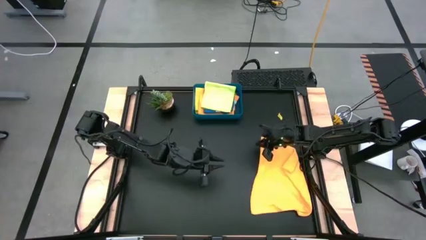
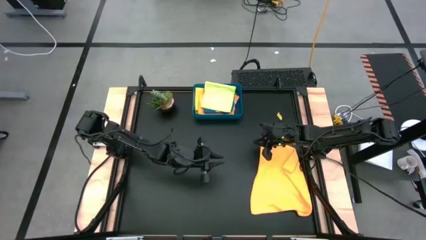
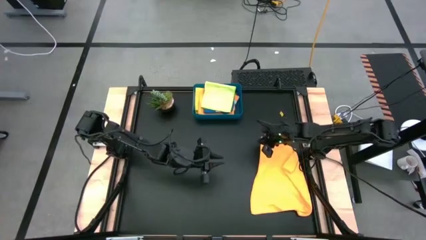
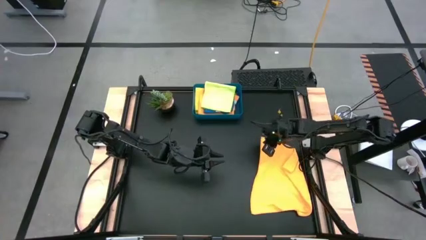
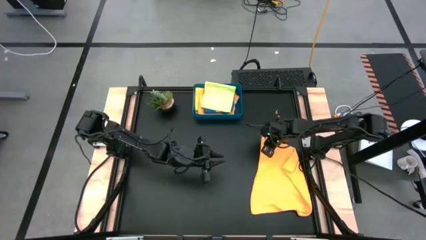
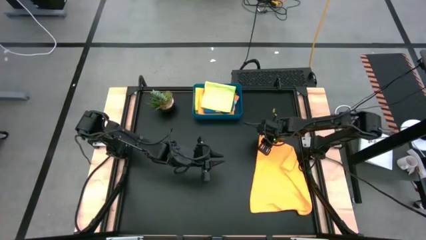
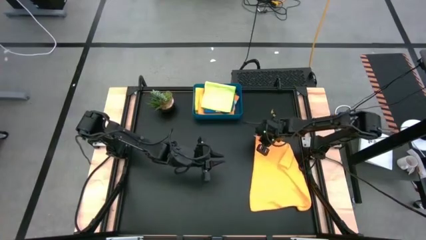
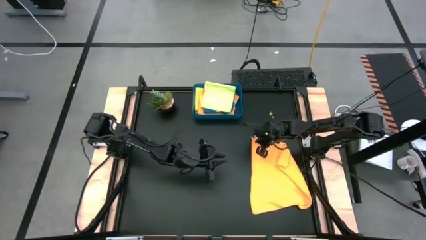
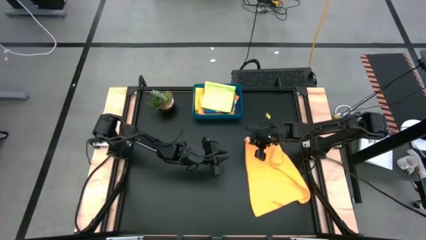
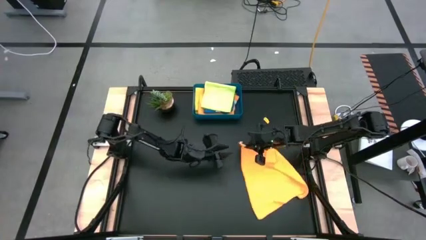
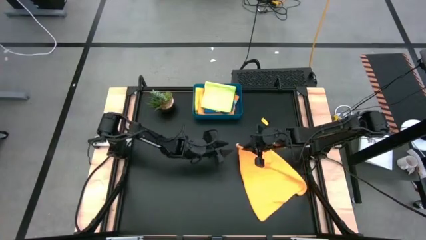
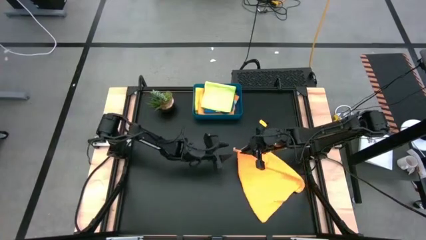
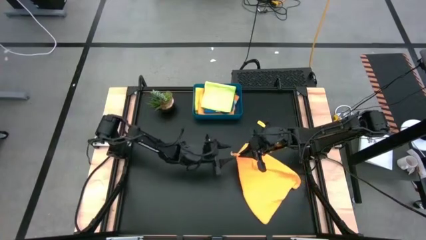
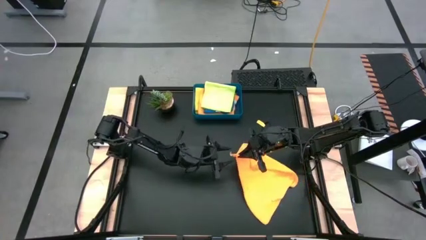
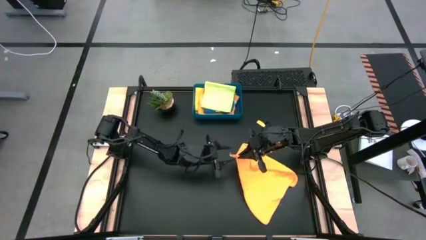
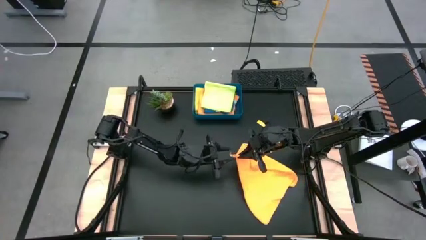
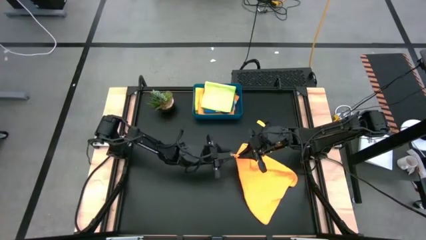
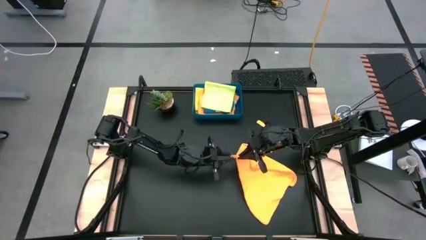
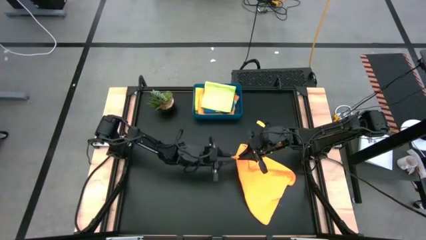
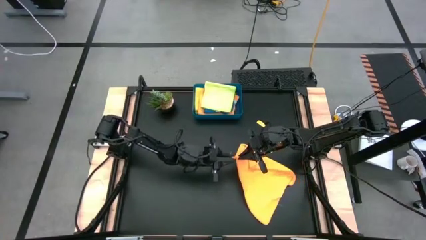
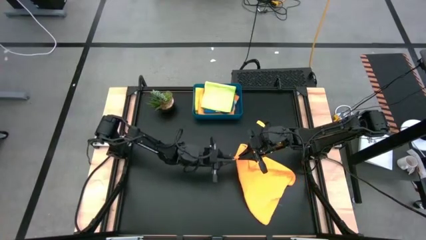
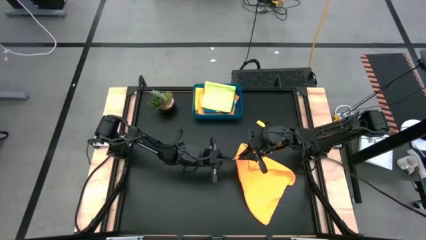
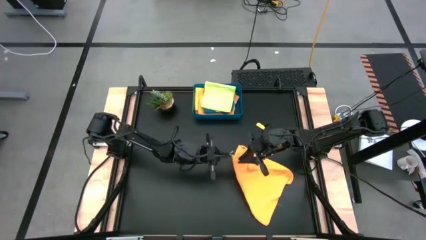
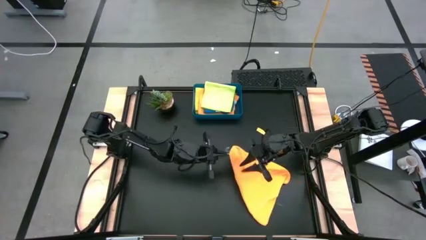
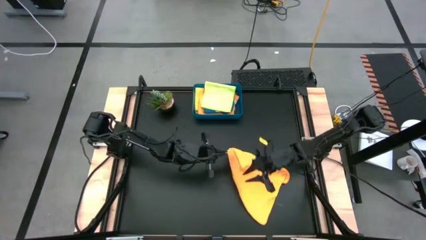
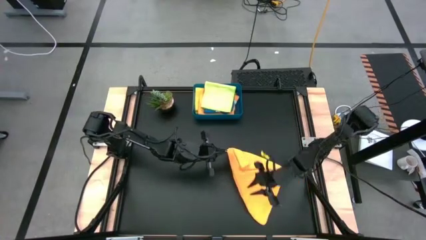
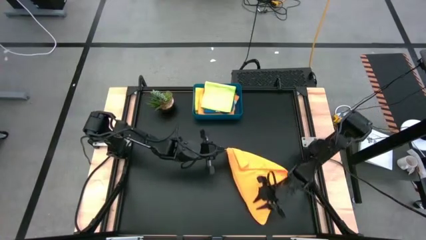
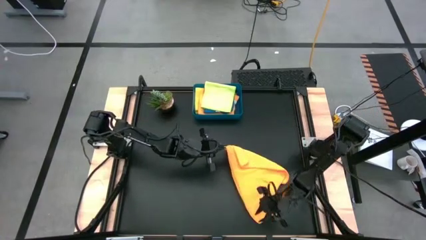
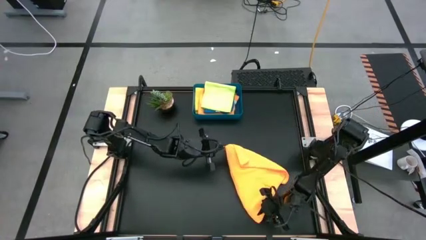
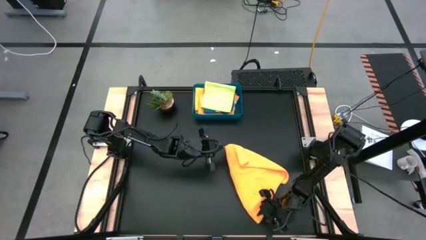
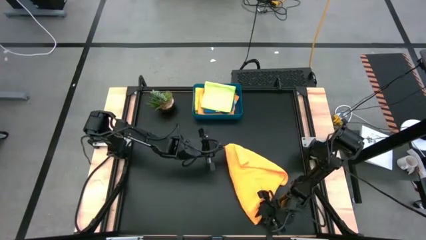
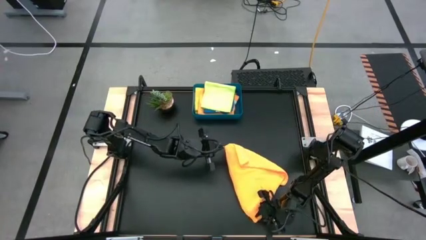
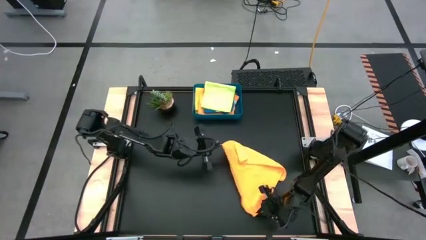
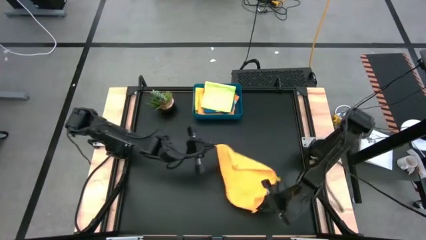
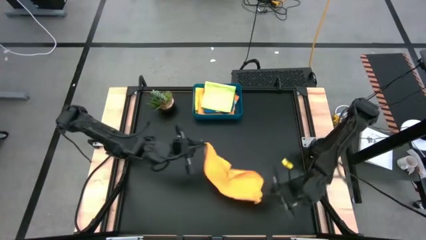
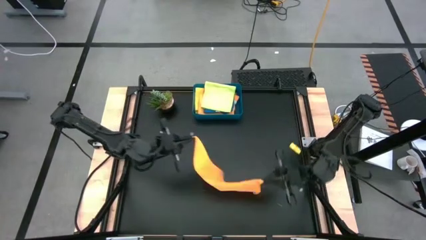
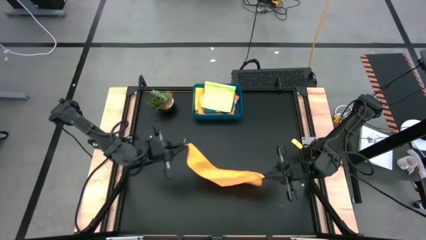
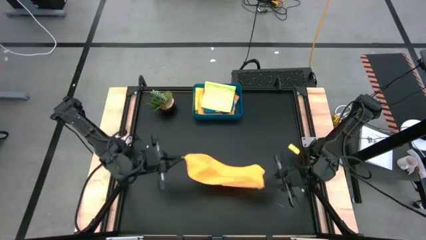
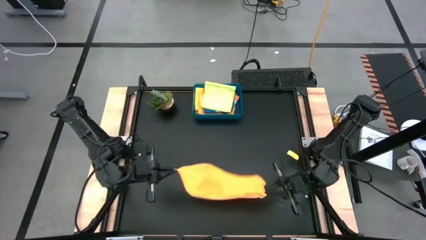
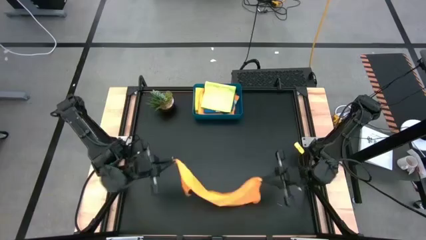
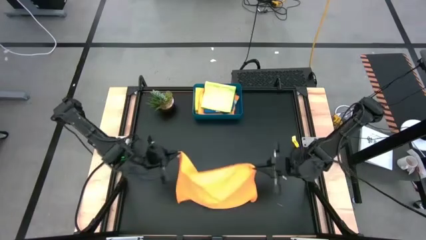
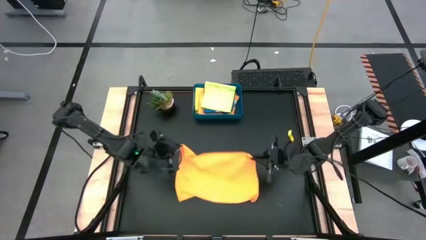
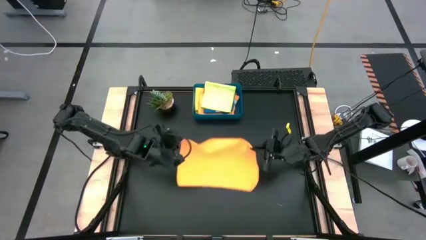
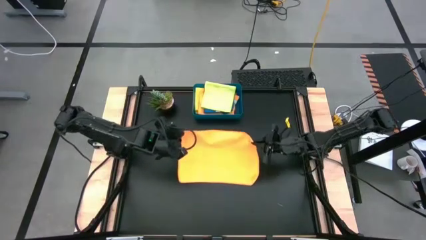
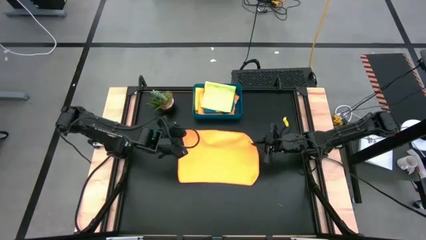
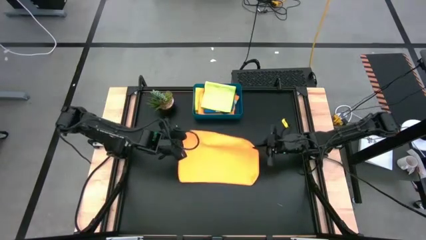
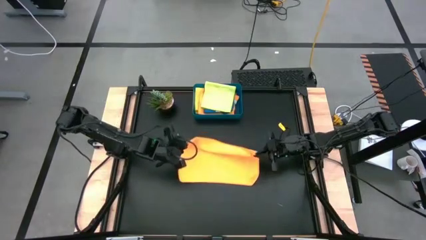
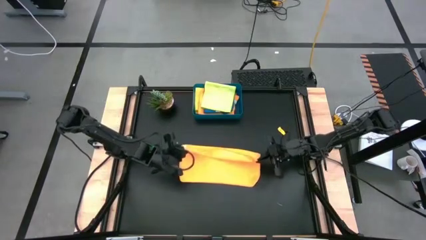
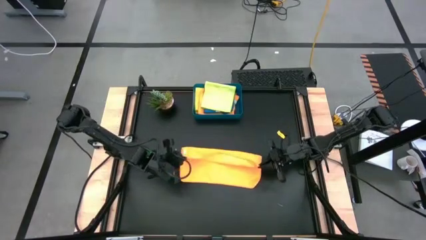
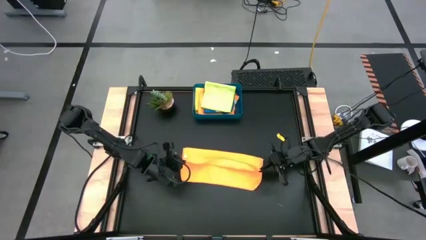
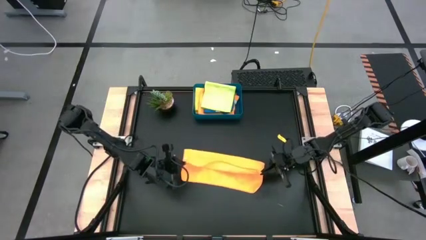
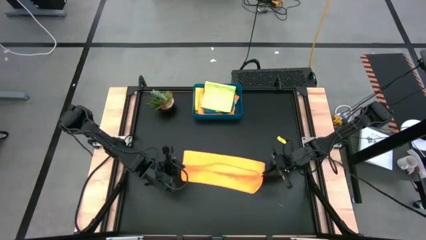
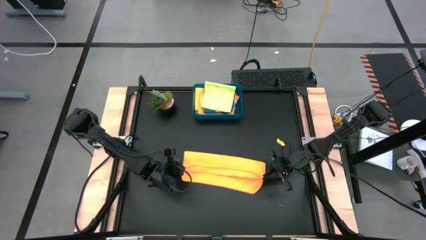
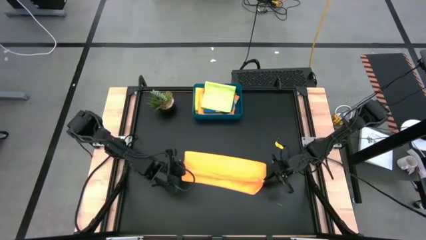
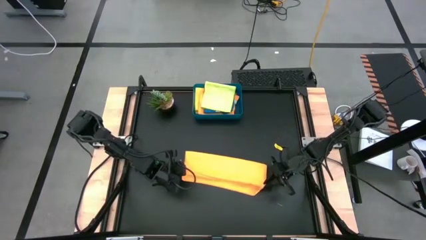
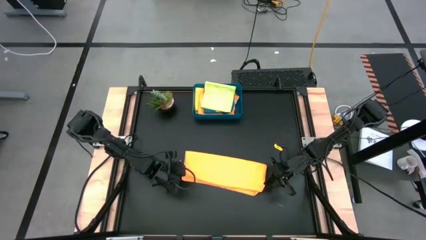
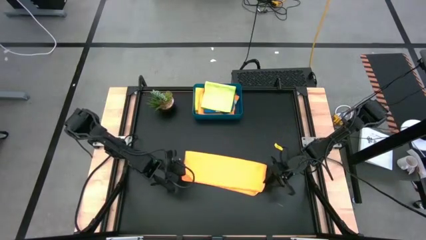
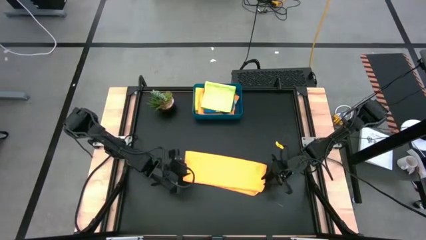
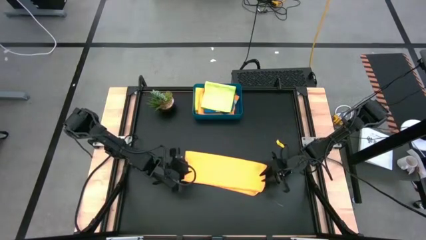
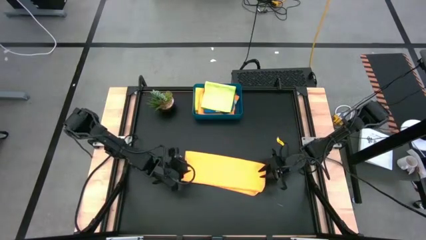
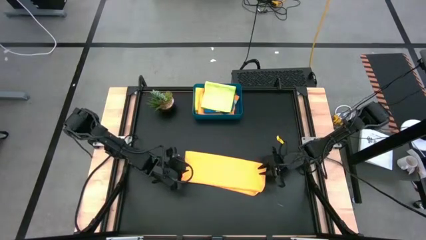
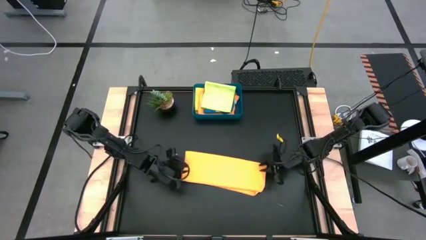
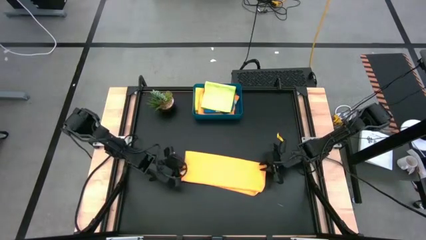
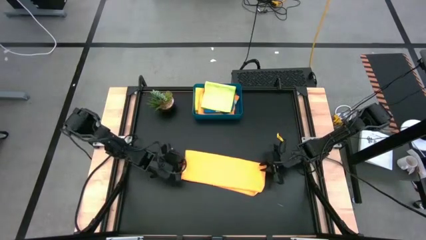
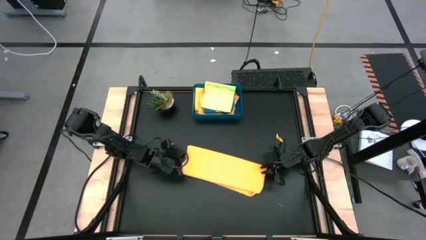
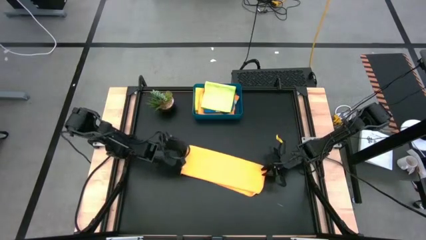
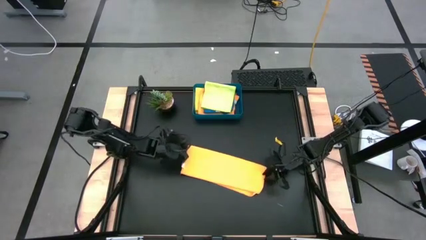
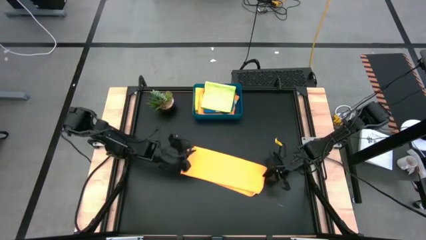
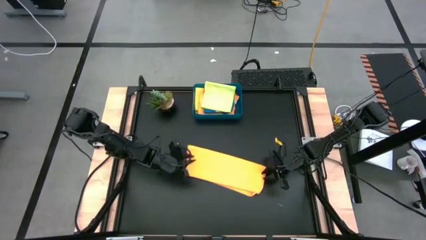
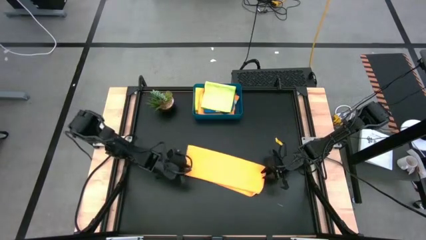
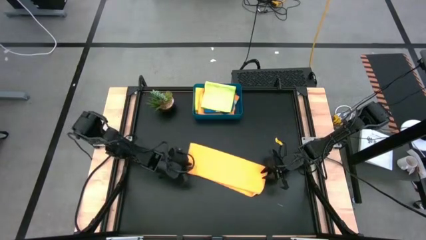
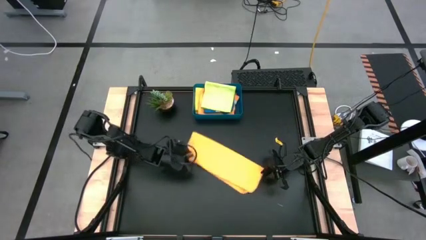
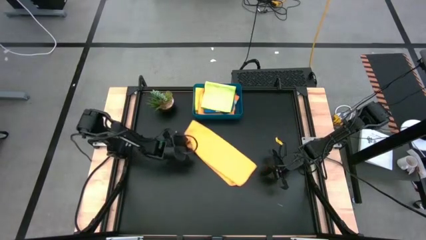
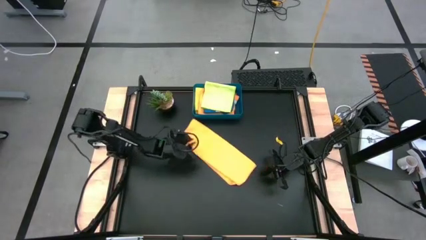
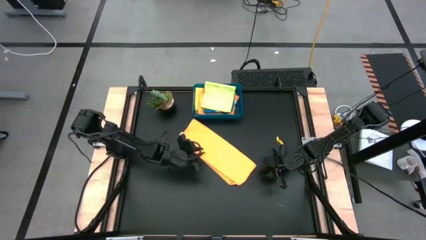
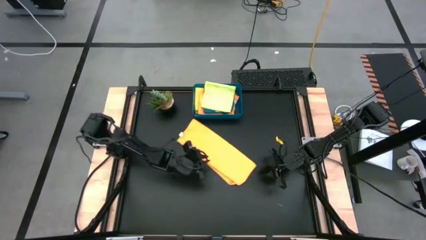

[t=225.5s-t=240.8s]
Task: Fold microfiber towels
Fold the orange microfiber cloth

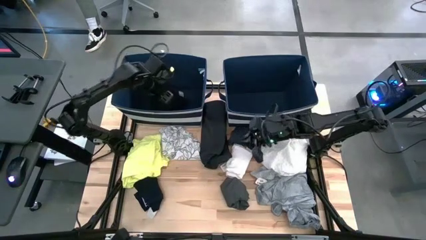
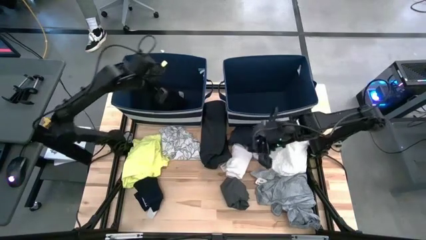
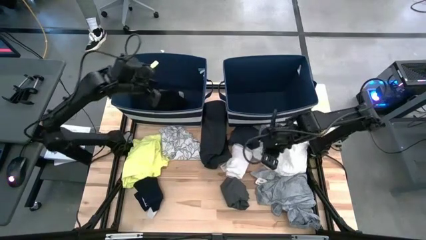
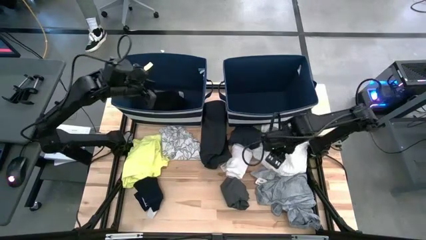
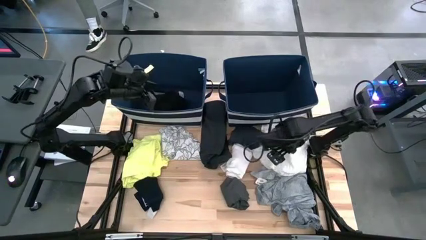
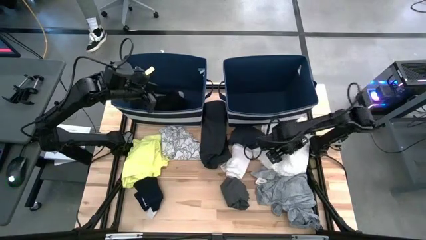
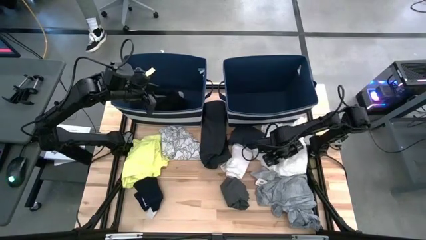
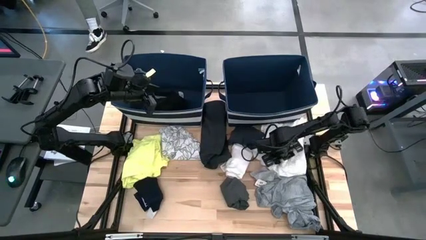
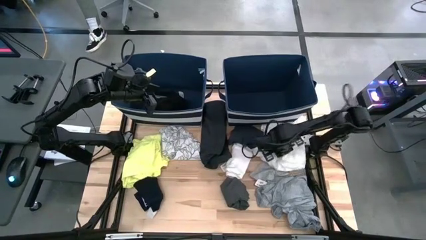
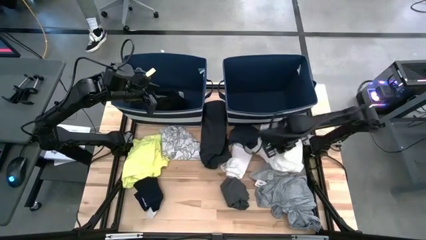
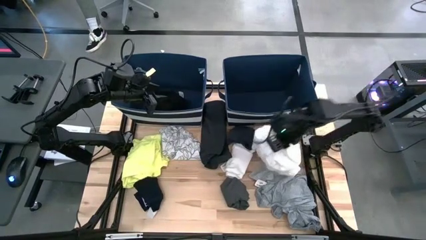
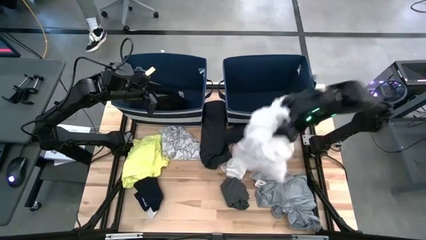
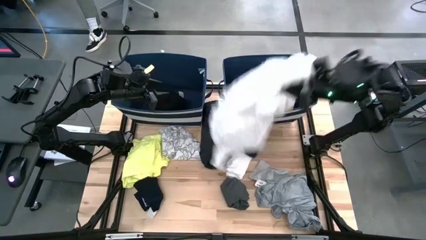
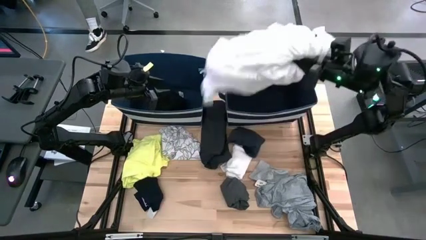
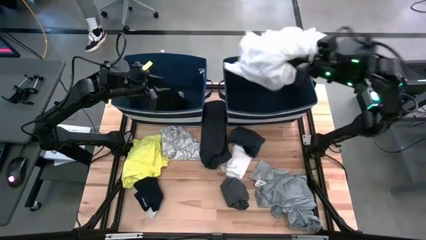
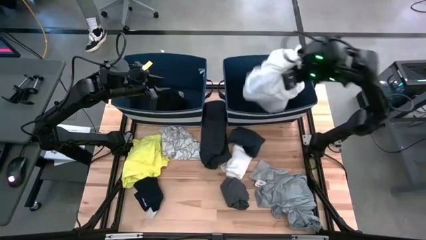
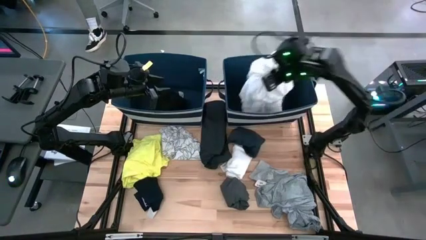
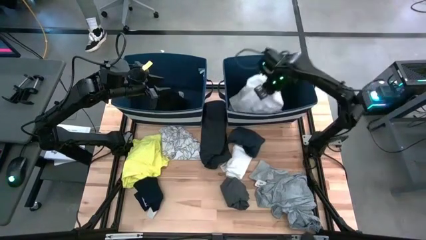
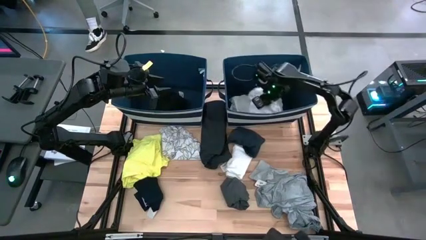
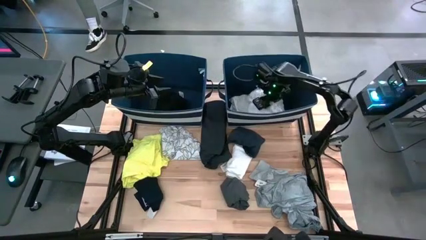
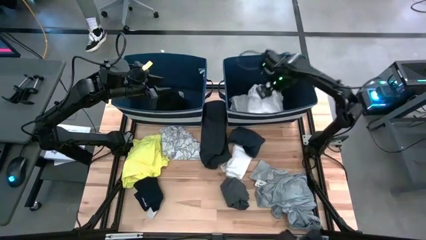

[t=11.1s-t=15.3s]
Task: Sort clothes
Put the white shirt into the right blue laundry bin
